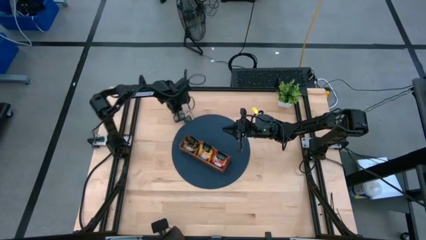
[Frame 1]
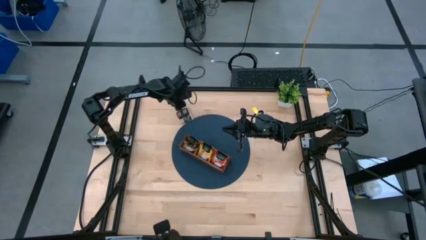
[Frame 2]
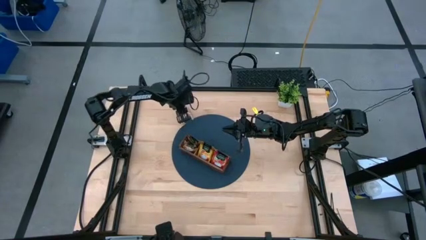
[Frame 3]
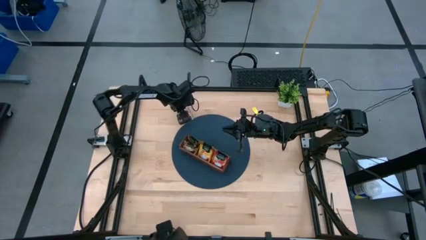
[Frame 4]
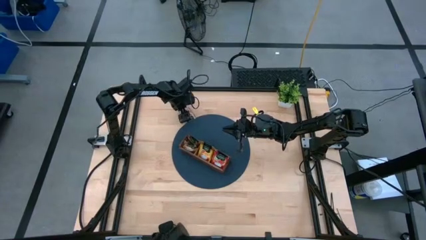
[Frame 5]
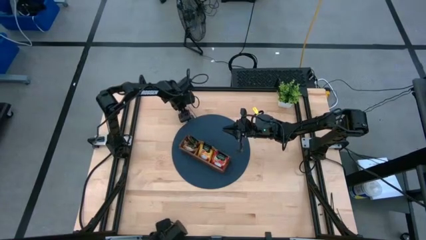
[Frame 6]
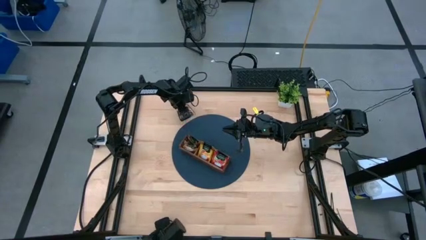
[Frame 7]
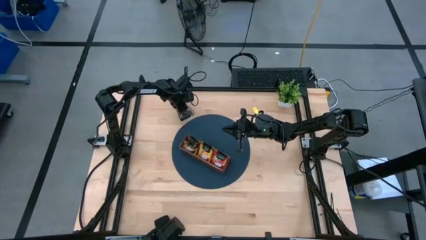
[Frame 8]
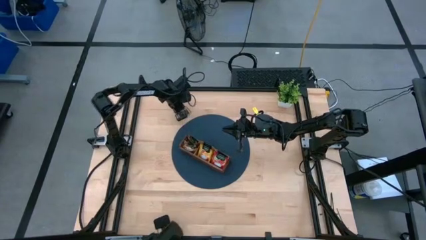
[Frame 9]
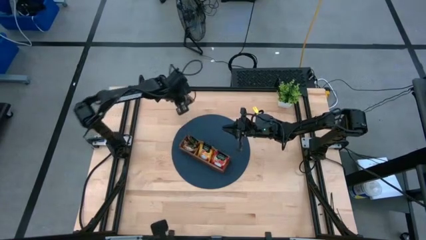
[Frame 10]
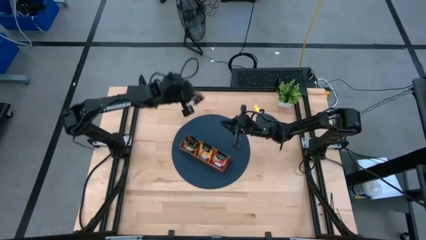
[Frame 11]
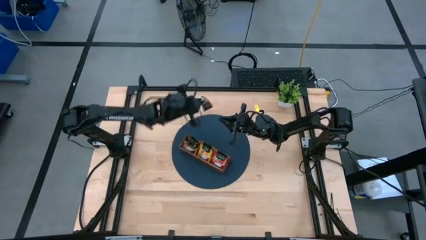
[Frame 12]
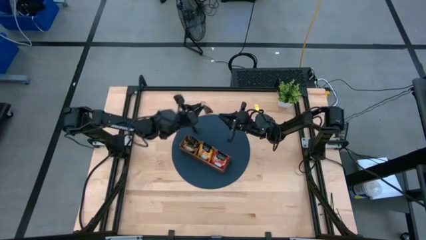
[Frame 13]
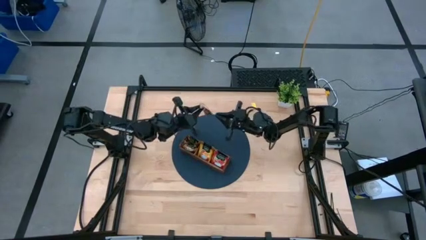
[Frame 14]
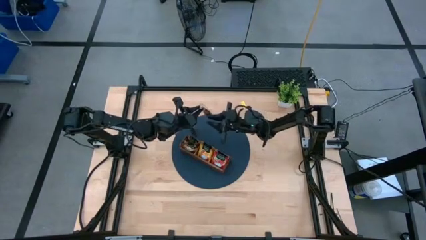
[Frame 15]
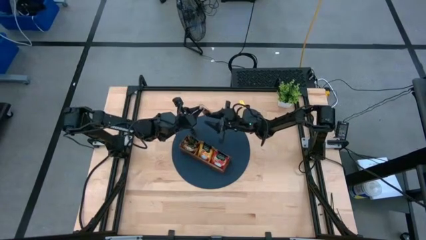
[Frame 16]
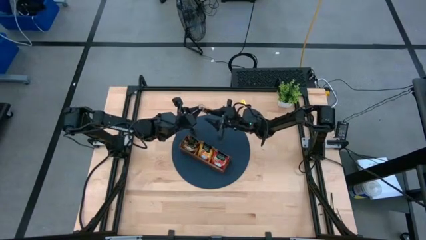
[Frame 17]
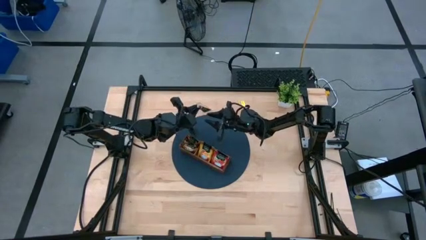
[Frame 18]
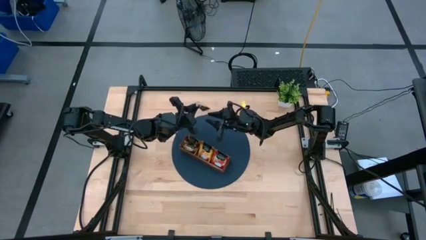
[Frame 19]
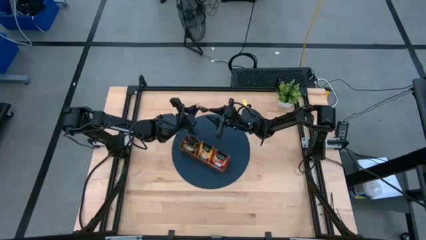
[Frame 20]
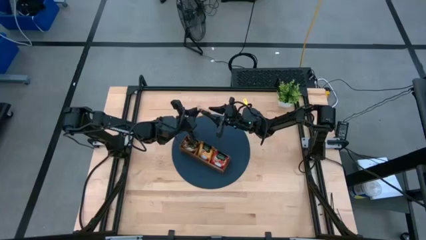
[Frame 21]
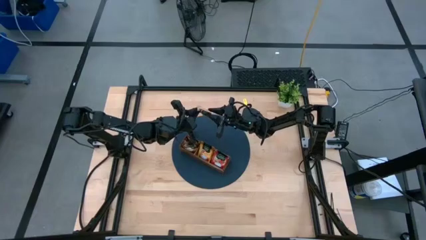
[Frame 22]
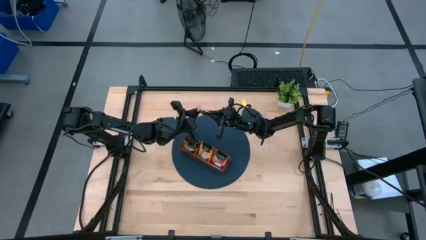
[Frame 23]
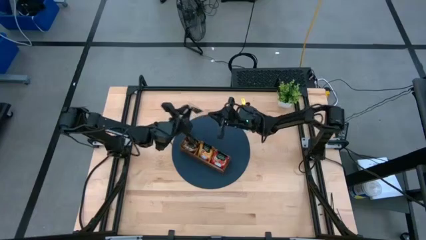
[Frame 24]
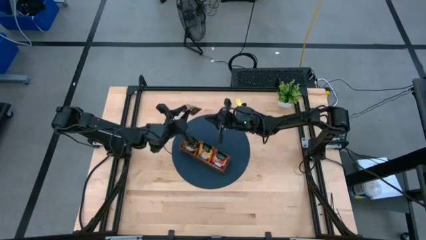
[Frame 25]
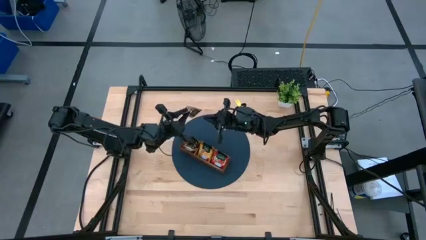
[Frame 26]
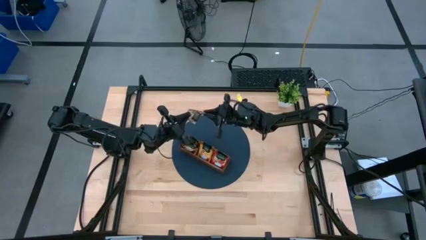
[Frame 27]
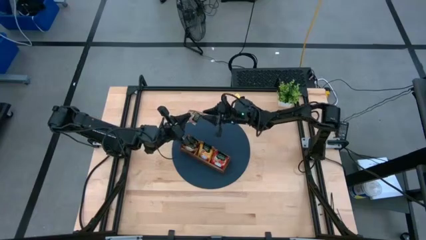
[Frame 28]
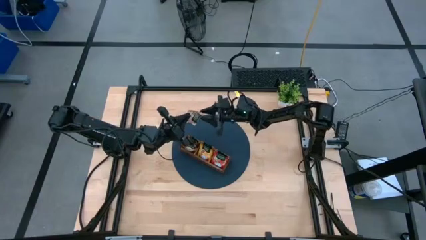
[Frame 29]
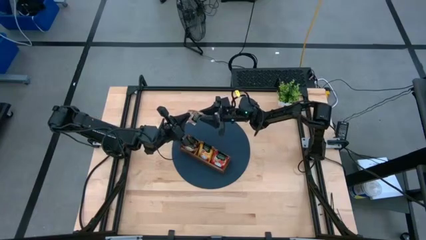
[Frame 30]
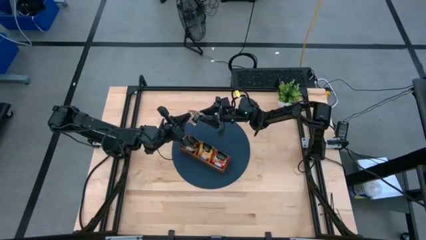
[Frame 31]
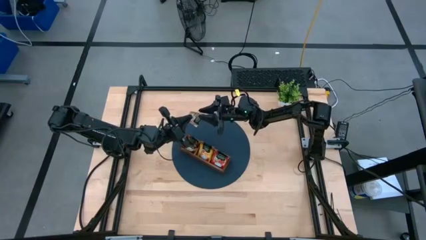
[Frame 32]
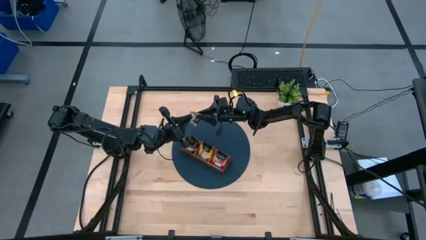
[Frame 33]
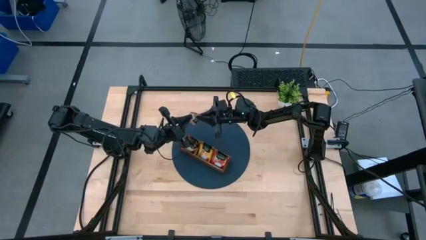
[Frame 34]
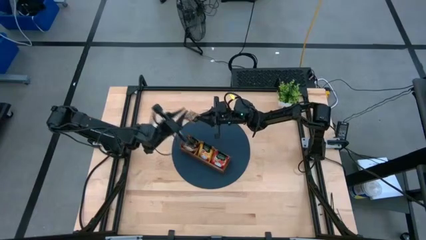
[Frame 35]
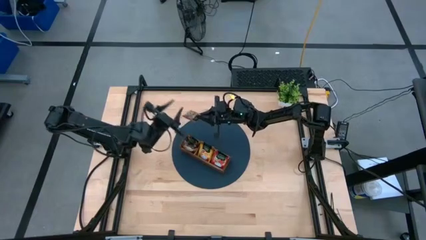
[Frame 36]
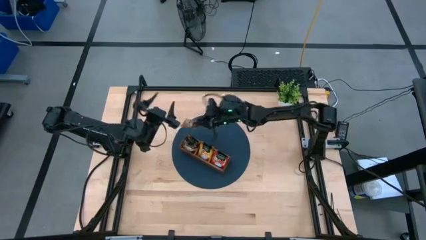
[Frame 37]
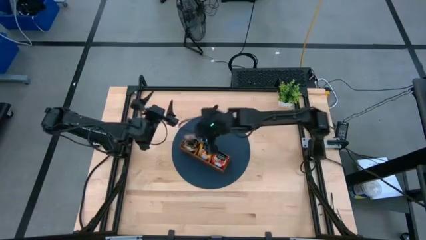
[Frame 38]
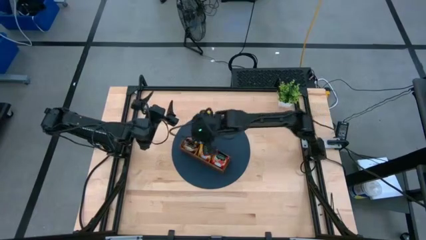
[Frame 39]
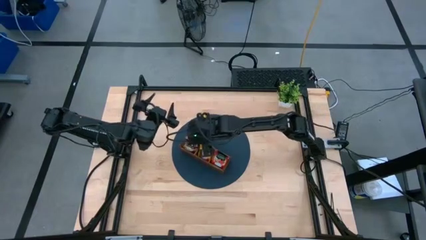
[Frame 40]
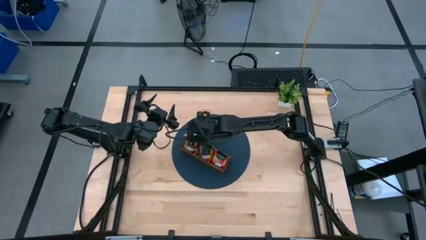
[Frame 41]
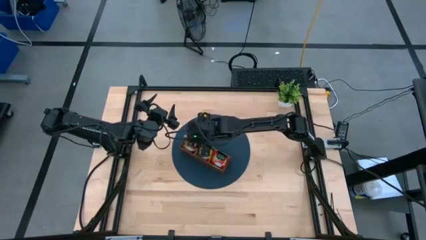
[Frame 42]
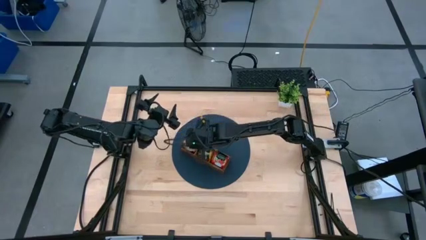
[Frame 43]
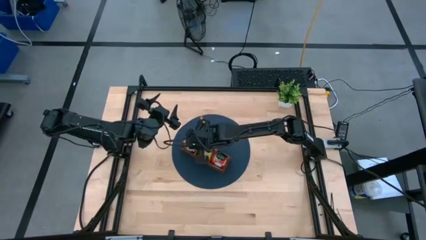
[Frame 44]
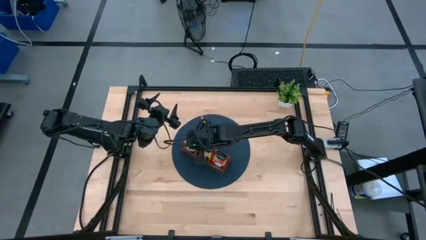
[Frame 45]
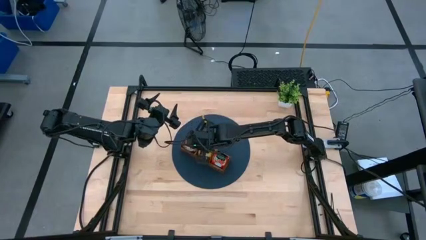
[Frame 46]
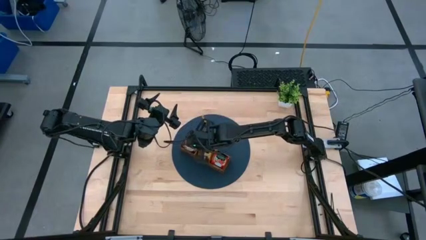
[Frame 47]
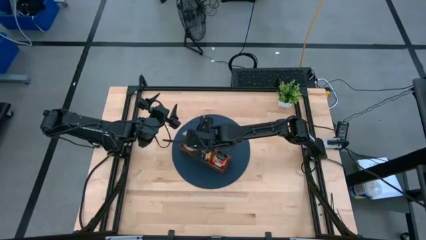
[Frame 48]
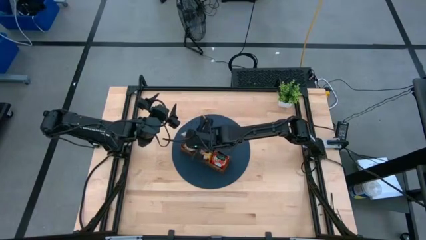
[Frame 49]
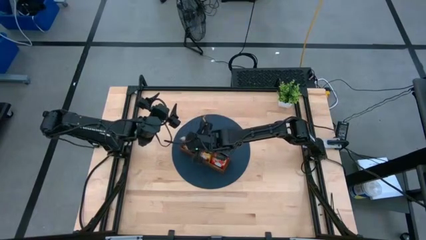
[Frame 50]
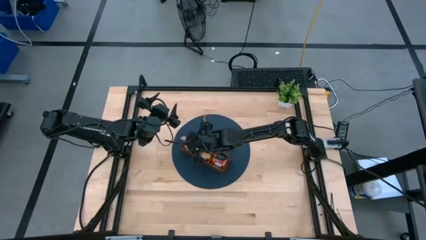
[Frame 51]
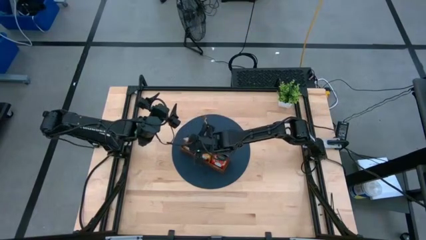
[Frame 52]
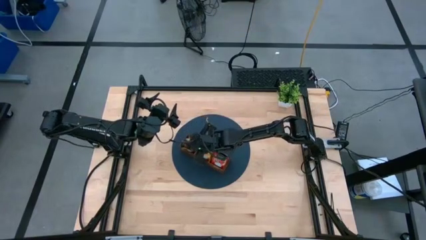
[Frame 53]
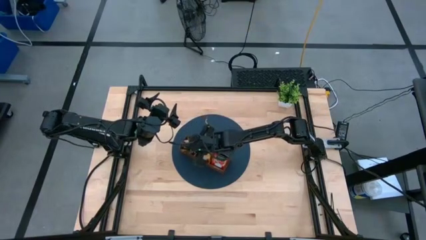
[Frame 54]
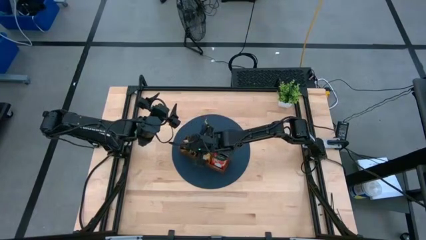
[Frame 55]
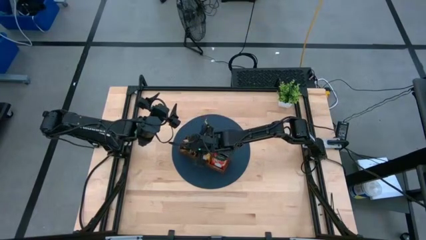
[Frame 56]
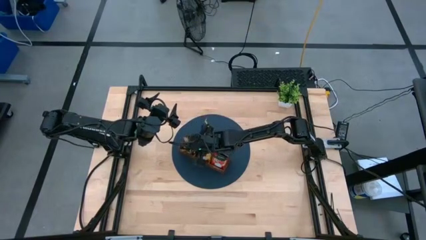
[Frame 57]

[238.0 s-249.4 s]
Task: Pick & Place Tea
Put the brown tea bag into the left section of the wooden organizer

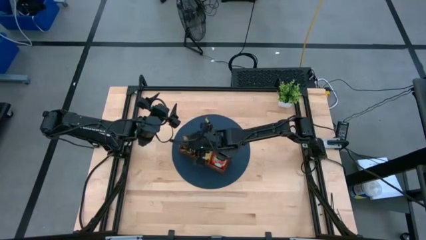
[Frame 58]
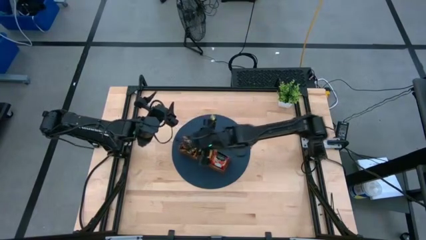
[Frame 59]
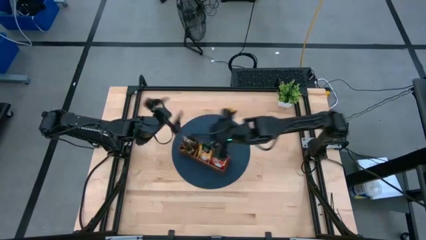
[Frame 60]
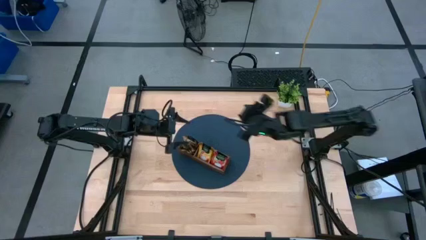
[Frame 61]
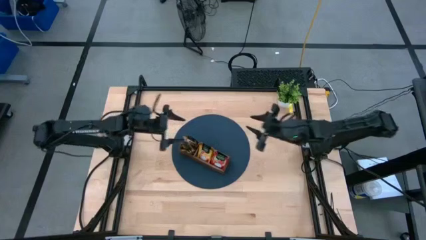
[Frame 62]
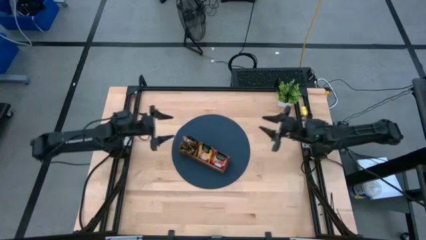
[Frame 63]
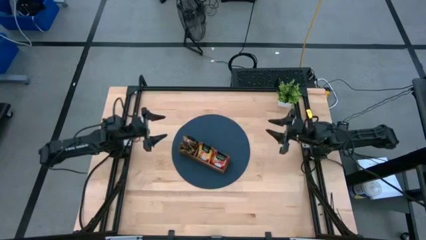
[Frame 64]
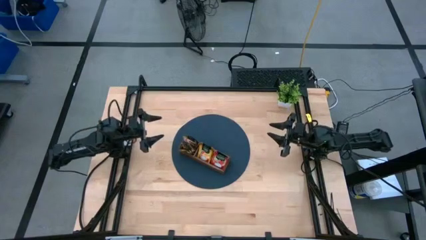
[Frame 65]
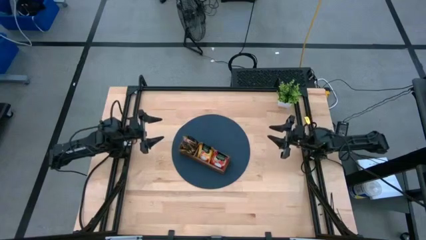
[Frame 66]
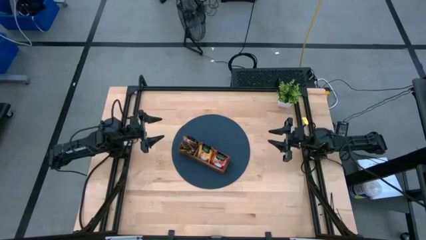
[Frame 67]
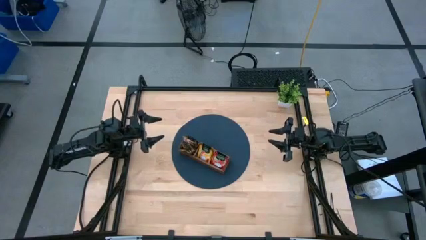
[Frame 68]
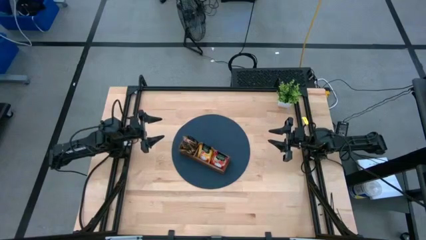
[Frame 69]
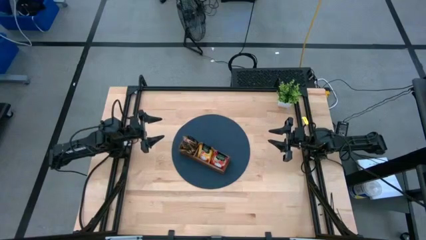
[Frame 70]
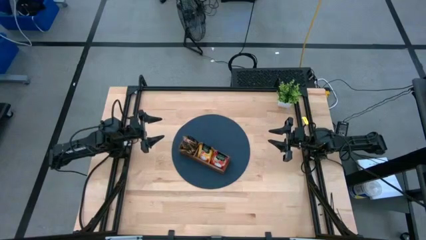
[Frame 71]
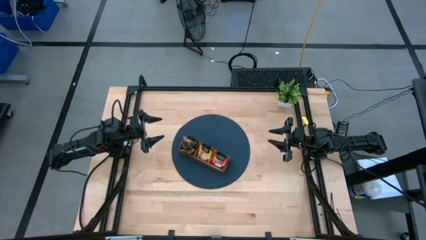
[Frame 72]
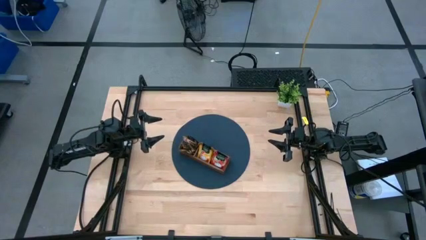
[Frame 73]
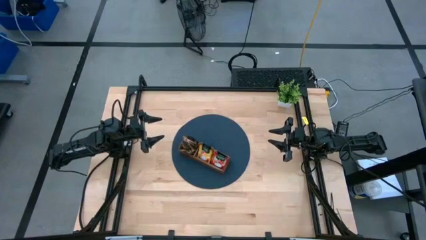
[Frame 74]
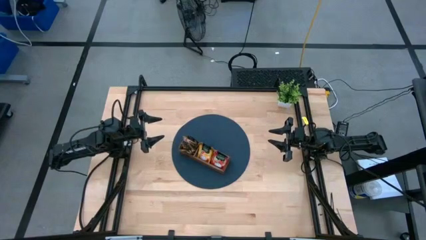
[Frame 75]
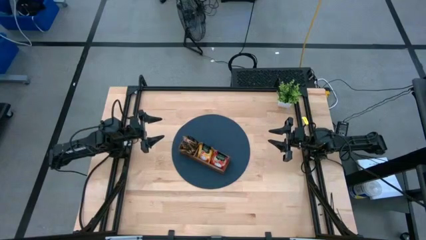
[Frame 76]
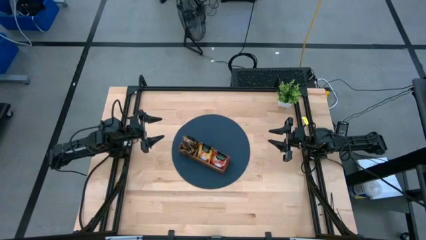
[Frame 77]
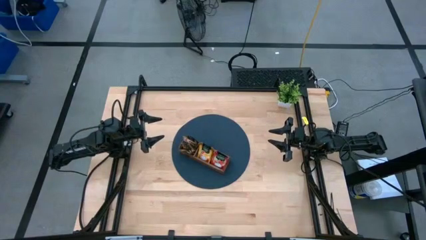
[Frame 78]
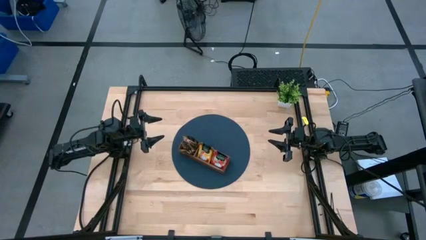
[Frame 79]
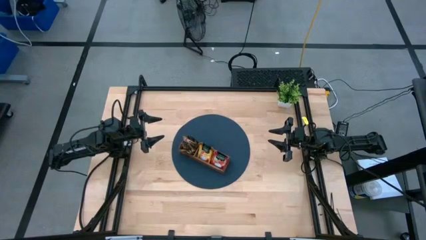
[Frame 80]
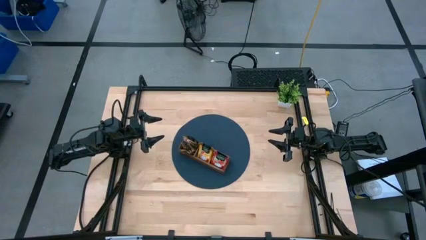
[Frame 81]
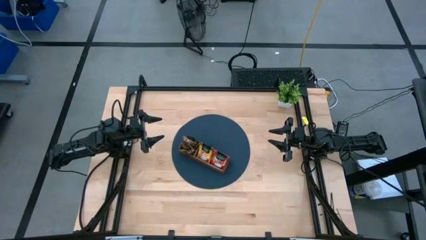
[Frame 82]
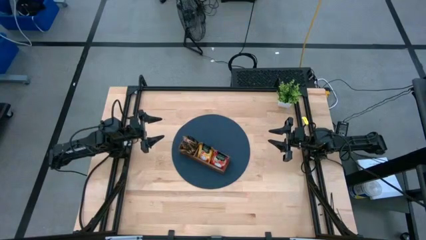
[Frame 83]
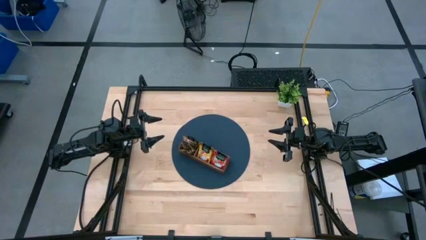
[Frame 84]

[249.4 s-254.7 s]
Return to Home Position
